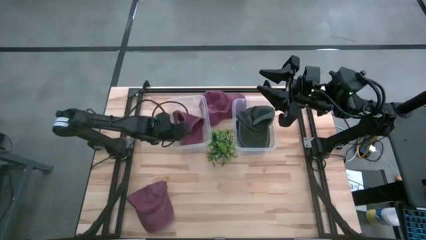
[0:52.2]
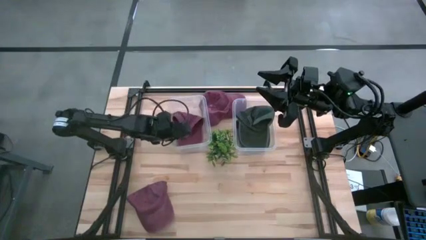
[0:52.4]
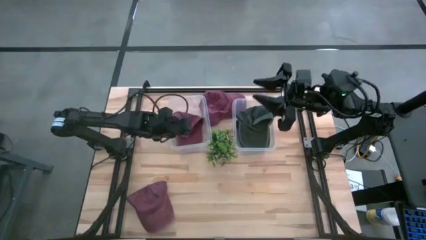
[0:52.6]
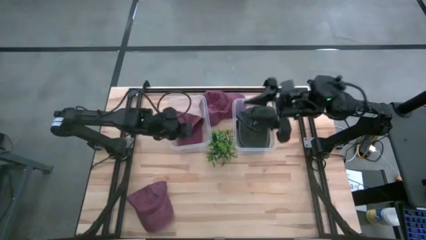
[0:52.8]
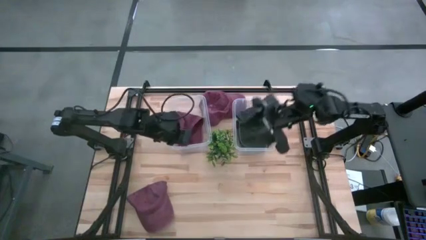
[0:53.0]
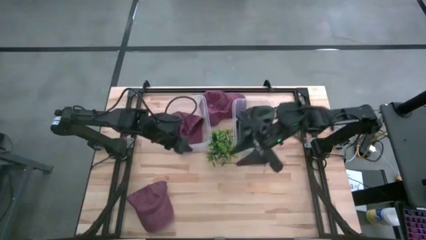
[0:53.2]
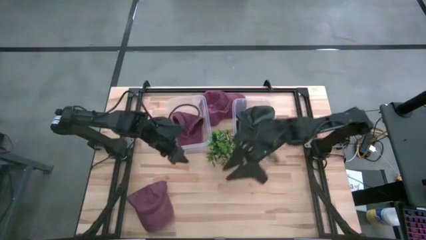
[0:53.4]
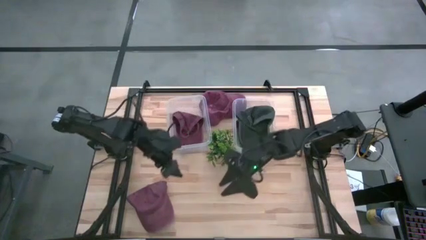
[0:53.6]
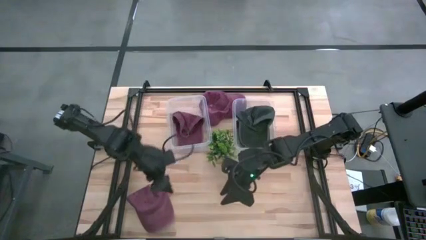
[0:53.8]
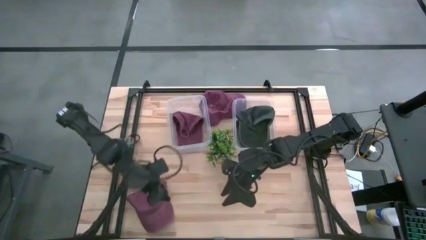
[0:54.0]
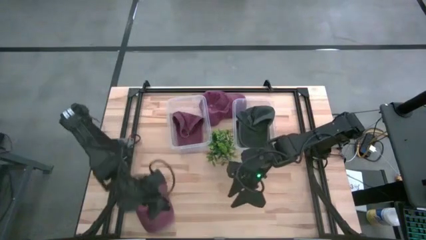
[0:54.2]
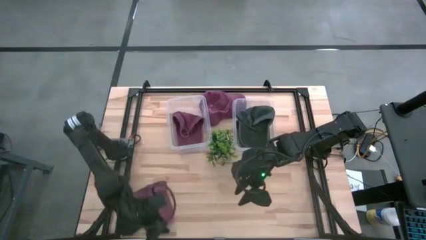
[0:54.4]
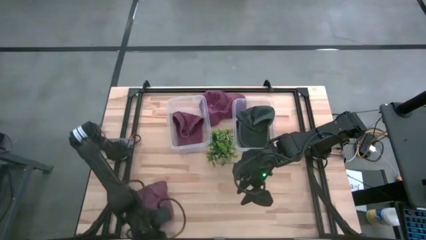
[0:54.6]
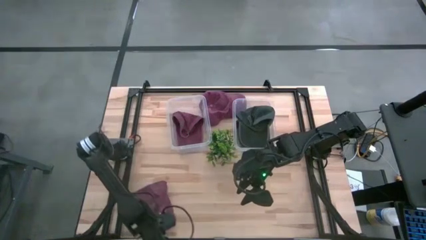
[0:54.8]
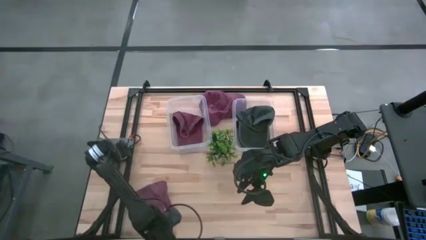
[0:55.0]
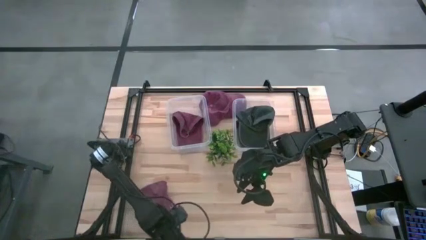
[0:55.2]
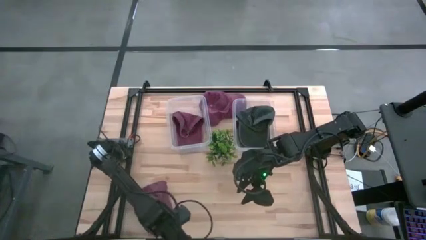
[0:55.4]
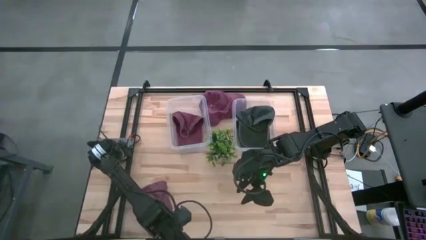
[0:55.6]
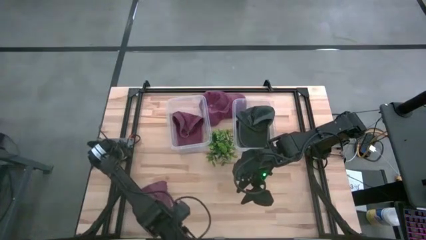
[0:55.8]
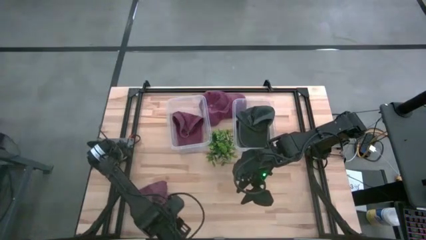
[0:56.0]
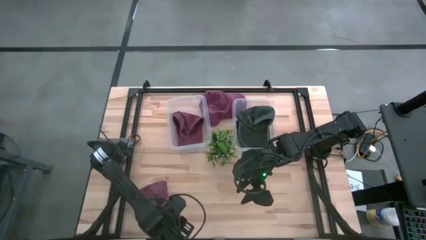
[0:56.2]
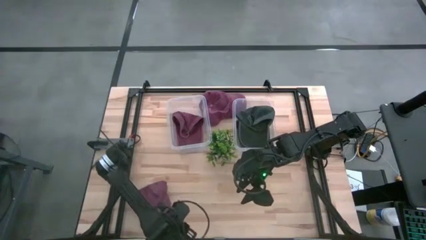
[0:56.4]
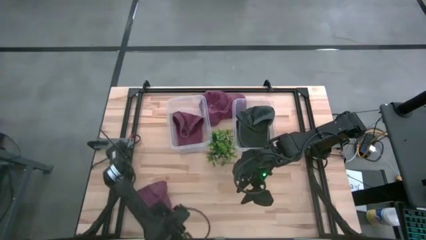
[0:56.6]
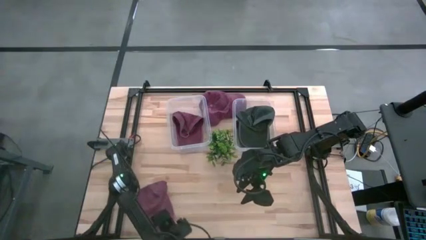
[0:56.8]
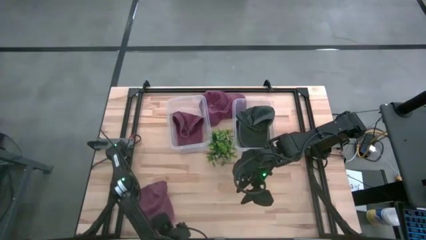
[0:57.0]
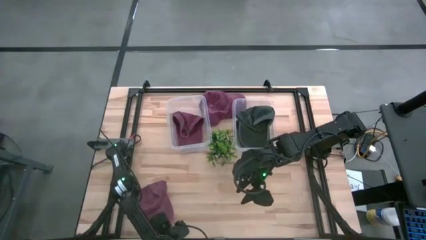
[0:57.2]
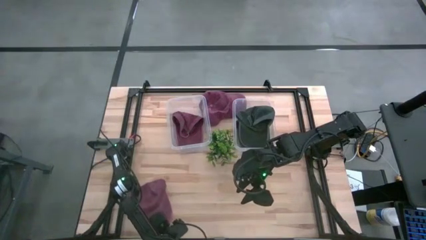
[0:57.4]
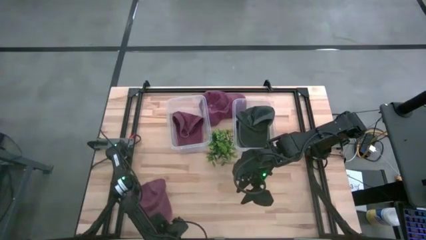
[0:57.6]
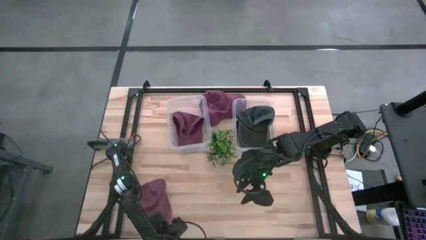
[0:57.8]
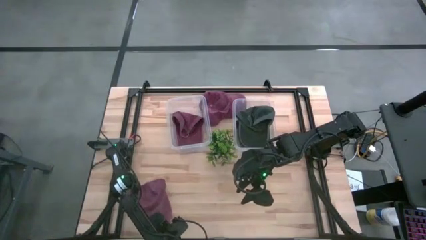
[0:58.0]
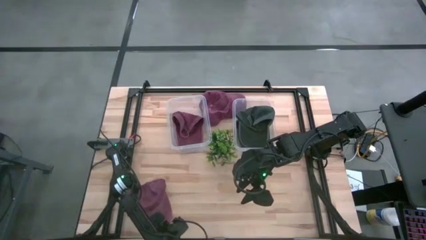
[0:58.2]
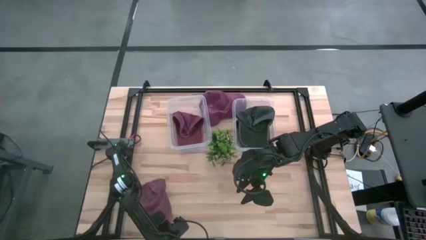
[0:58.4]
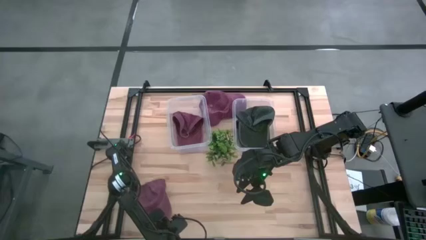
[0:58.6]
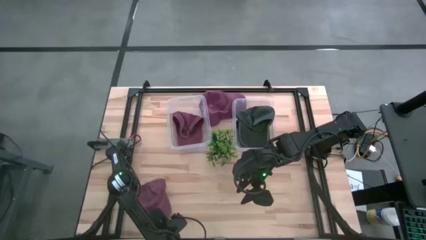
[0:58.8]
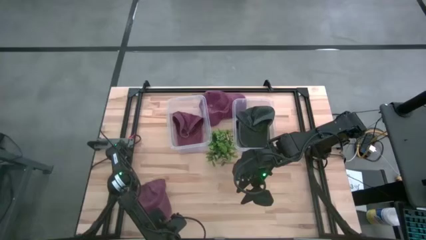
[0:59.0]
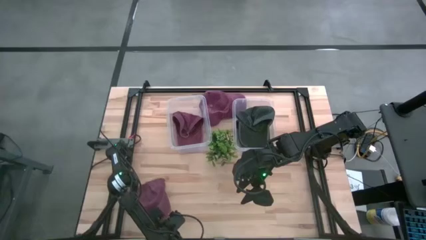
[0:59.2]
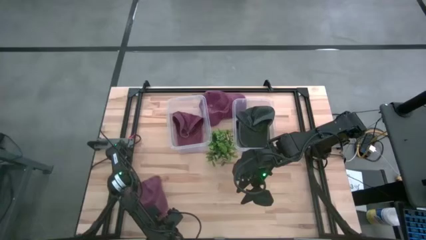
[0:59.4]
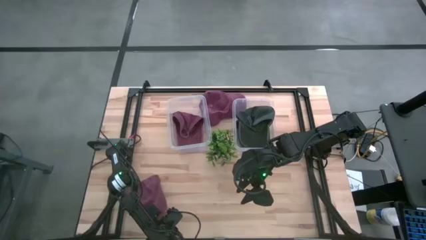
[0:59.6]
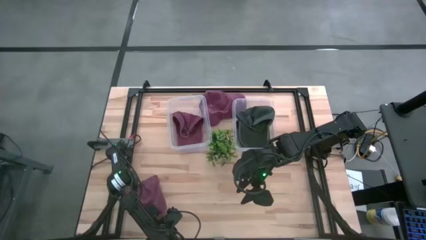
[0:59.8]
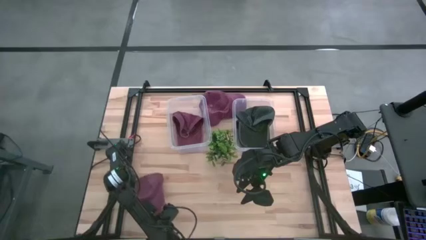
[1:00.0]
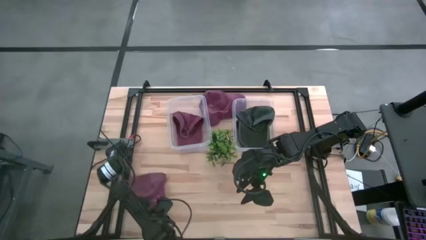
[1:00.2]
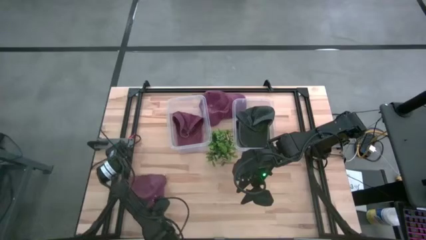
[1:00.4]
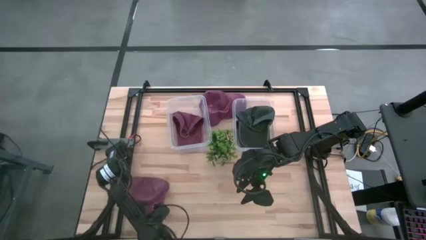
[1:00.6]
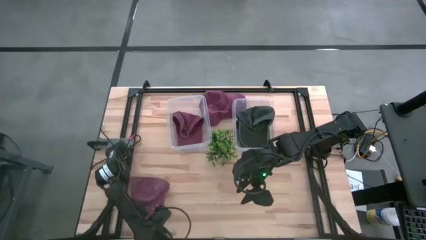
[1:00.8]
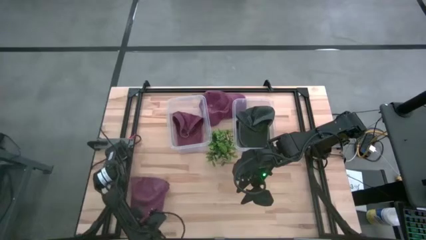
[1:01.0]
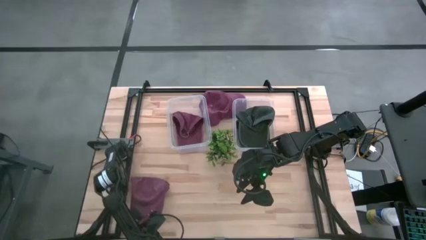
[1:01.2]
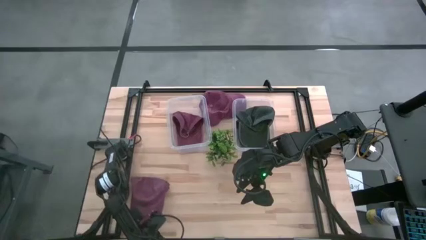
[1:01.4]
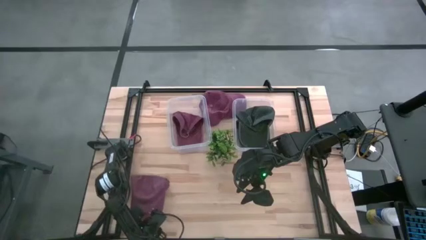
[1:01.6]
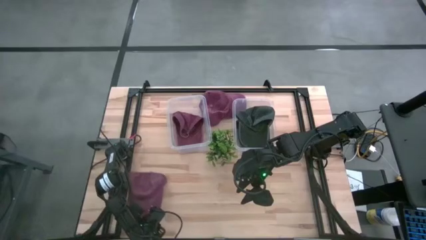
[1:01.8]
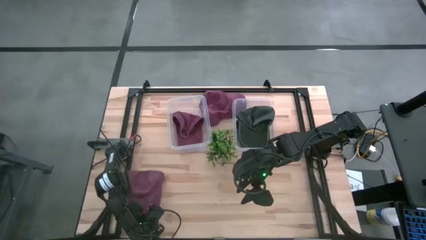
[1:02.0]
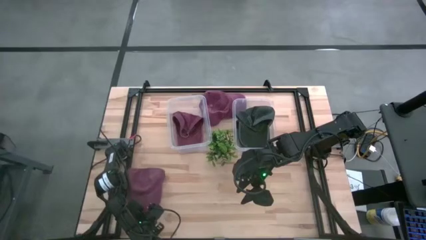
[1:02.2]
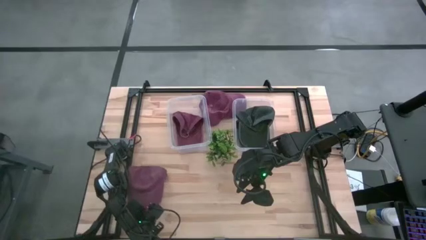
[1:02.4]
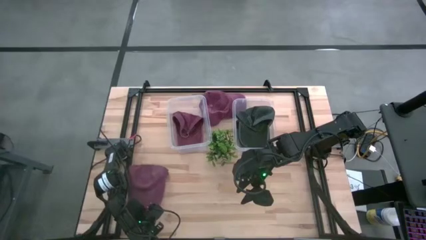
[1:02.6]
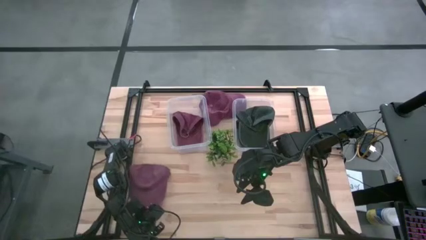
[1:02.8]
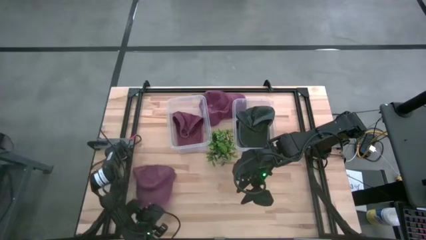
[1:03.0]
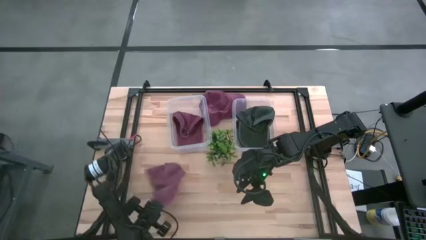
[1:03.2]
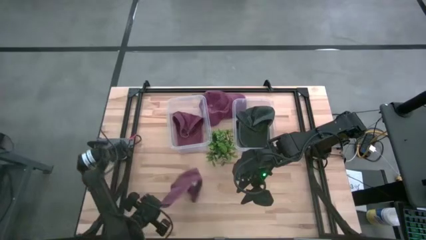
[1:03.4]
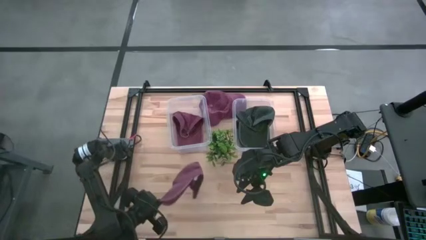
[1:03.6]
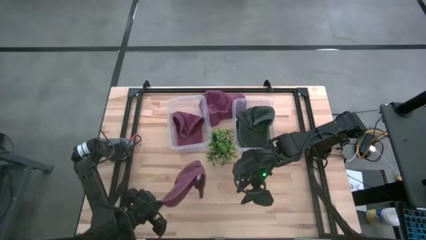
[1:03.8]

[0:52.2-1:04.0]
Task: Pick & Place hat
Put the bottom red cap into the left transparent bin

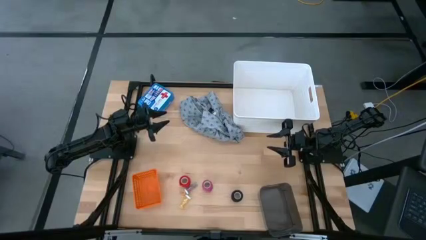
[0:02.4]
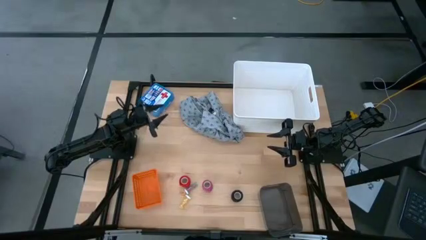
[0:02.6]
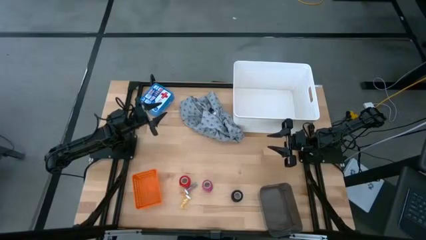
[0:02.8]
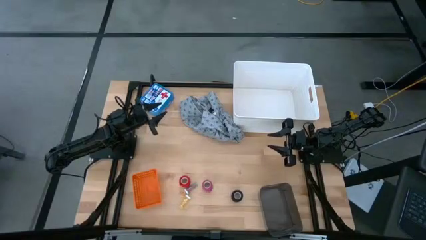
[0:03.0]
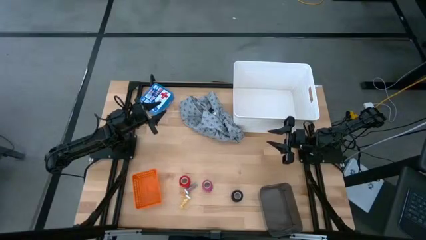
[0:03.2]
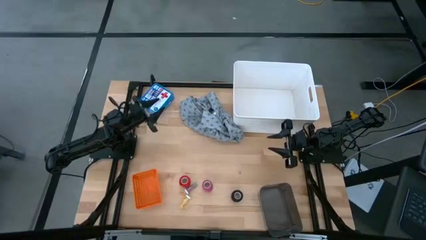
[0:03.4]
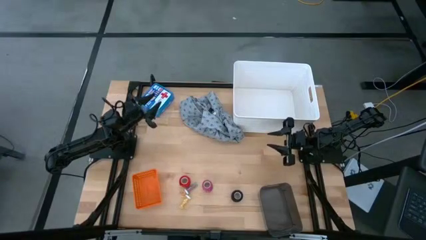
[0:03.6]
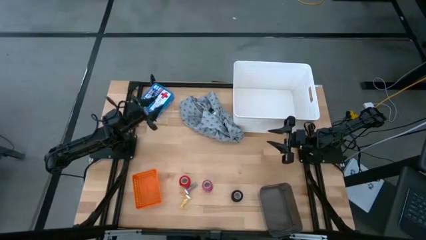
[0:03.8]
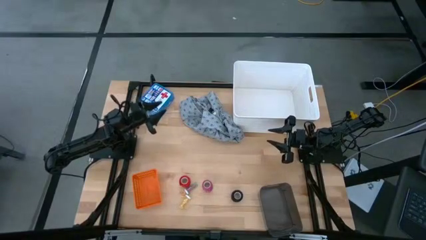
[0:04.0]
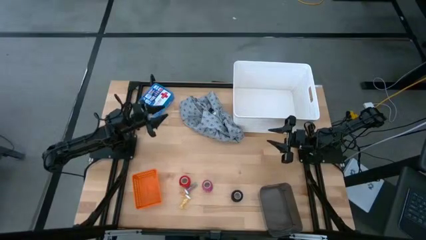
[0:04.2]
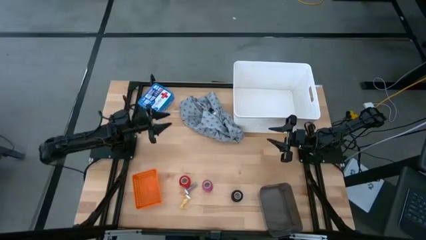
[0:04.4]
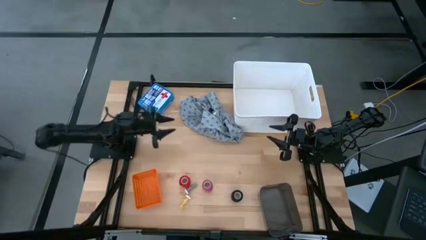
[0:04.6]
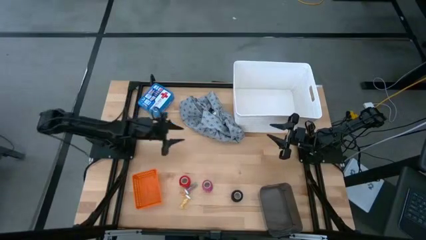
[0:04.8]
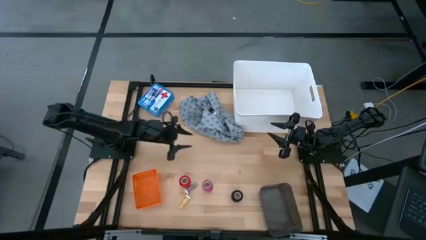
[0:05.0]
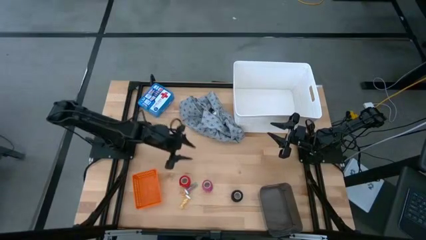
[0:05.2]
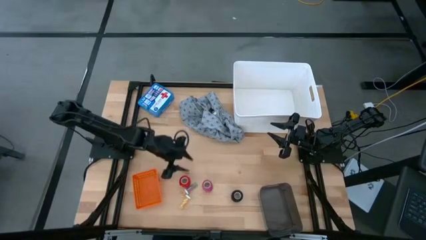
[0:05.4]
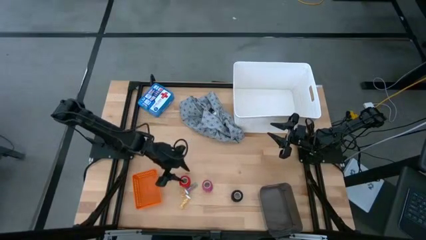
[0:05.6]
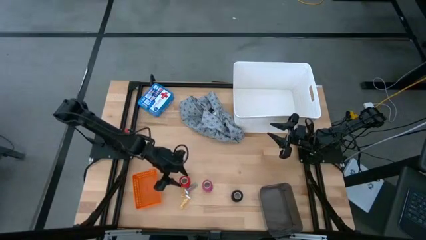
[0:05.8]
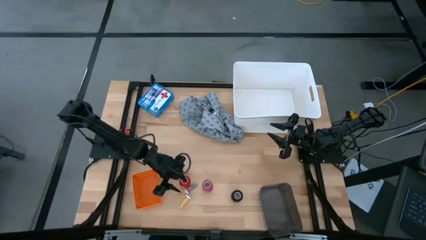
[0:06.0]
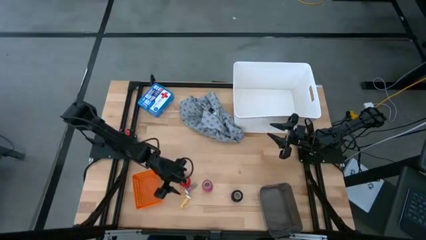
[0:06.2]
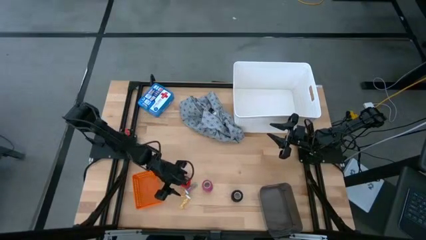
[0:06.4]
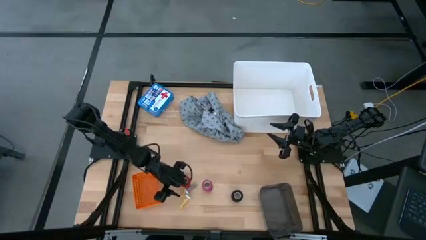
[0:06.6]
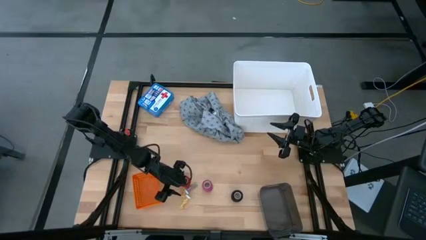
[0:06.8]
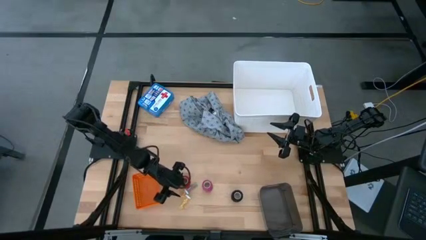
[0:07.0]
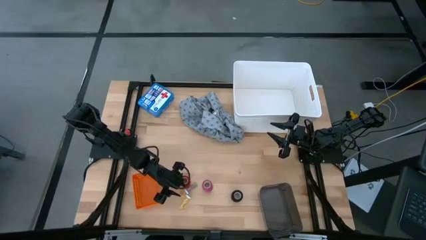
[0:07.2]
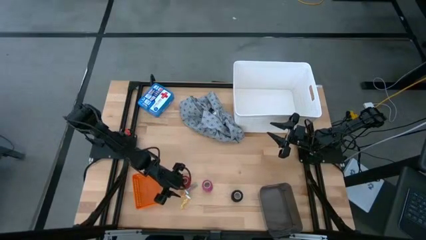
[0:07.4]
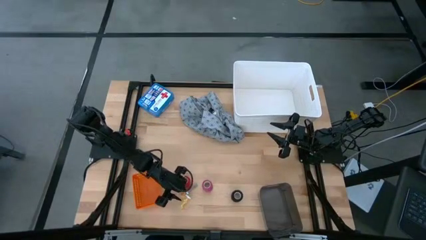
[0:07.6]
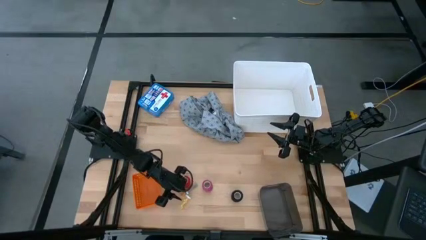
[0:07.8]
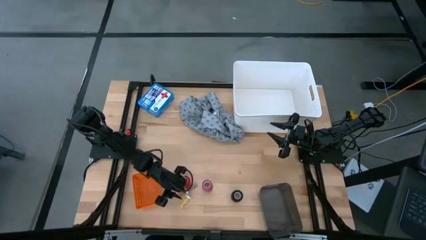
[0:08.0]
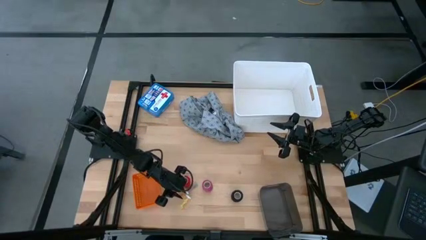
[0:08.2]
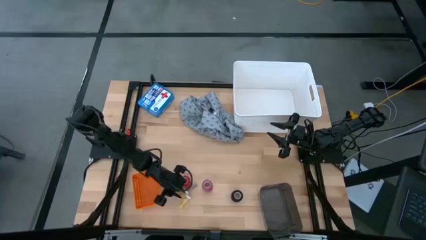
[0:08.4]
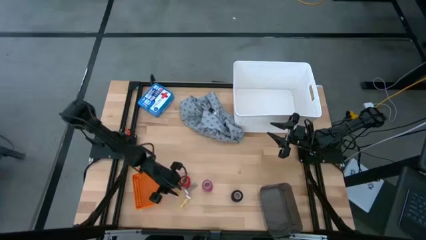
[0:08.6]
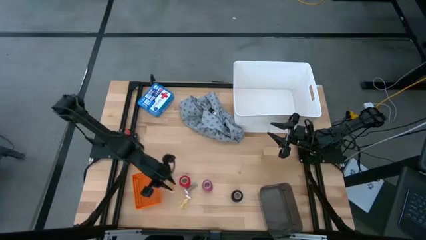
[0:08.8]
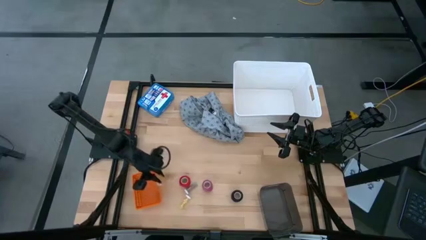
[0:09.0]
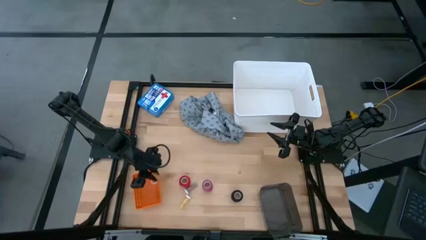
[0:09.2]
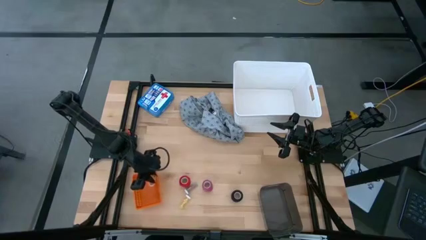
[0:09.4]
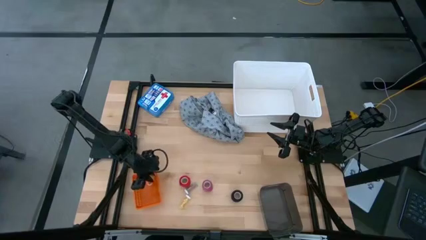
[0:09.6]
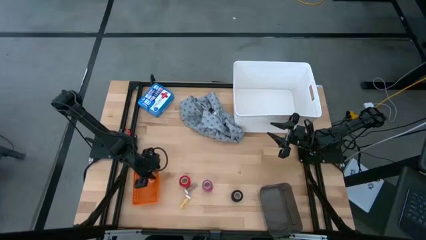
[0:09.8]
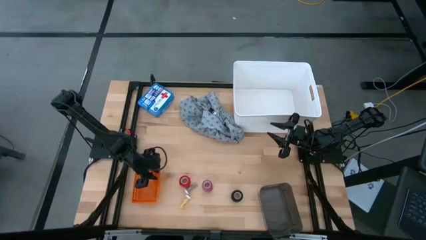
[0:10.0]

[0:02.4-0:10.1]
Task: Pick & place medical supplies in basket/bin
Put the green pill bottle into the orange bin
